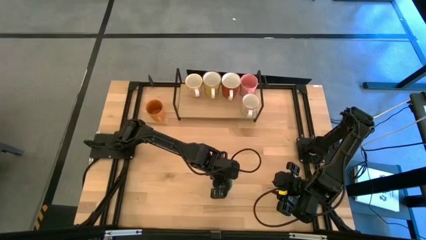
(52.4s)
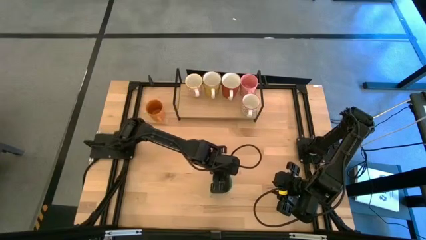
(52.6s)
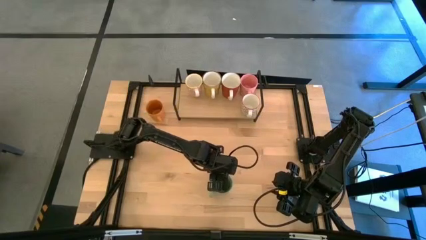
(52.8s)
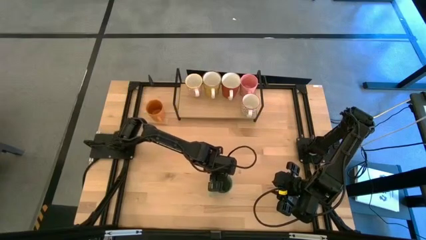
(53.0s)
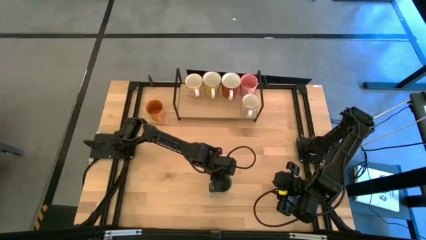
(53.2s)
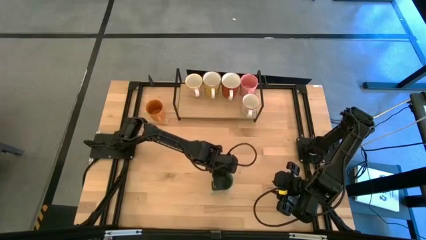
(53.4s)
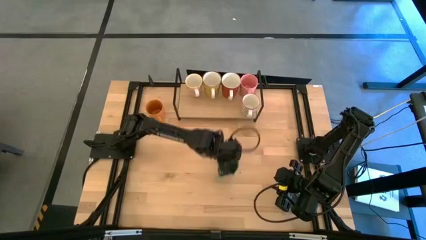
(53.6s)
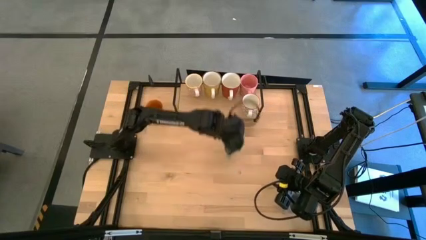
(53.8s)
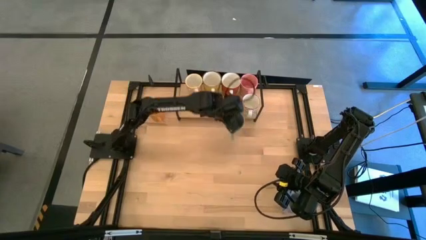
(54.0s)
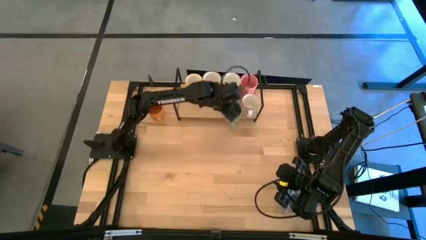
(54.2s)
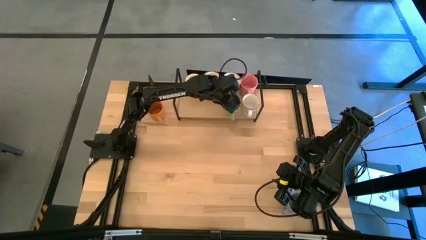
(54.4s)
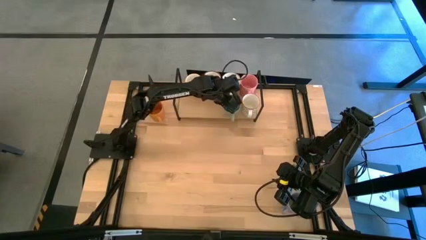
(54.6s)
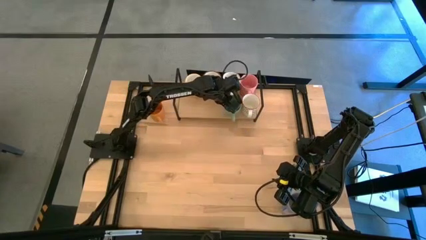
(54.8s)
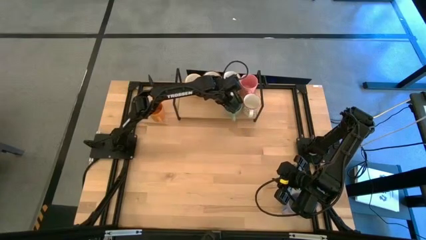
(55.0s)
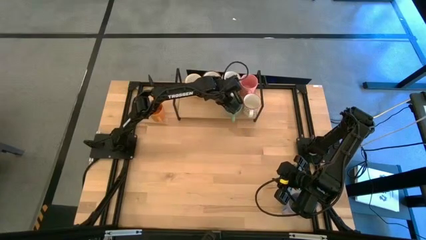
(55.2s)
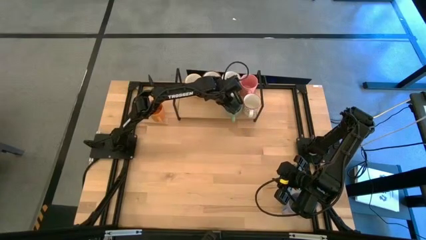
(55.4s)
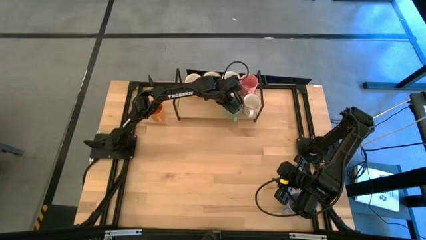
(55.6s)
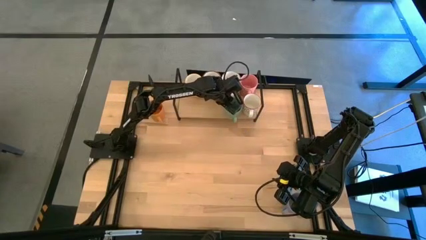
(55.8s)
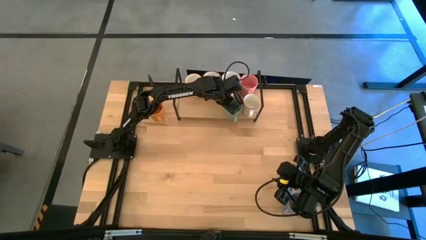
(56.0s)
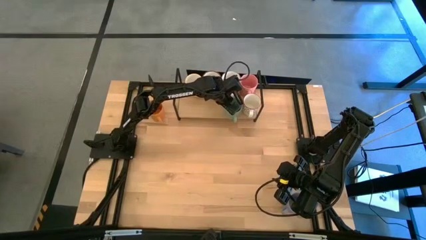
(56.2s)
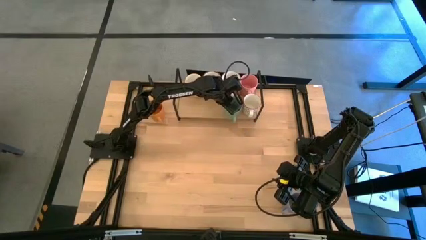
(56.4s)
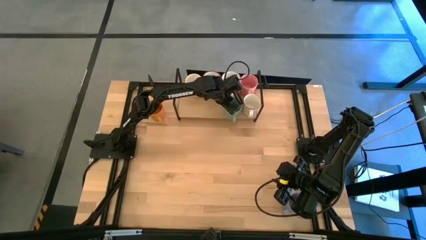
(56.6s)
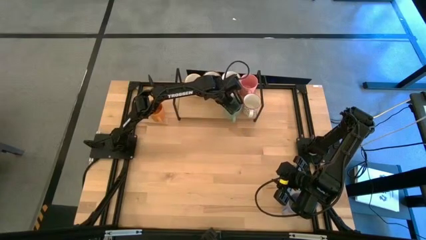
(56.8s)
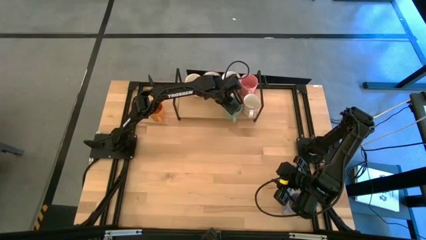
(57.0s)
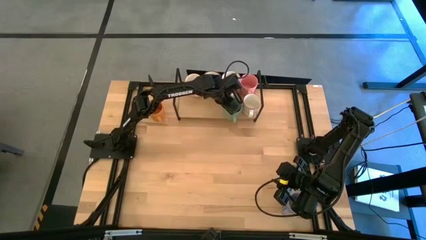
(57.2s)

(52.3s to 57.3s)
Task: Place coffee mugs
Put the green mug on the shelf

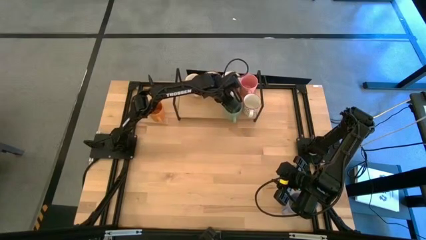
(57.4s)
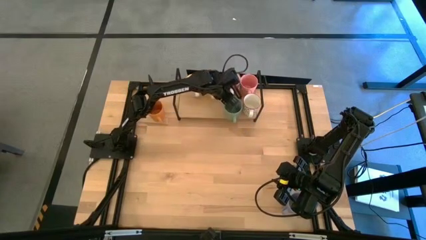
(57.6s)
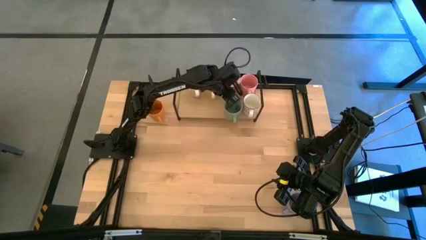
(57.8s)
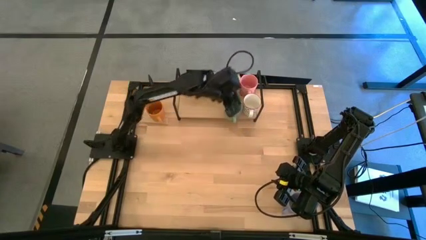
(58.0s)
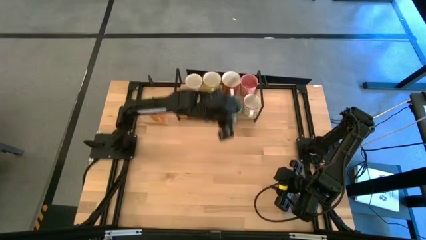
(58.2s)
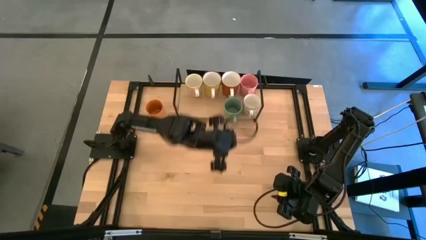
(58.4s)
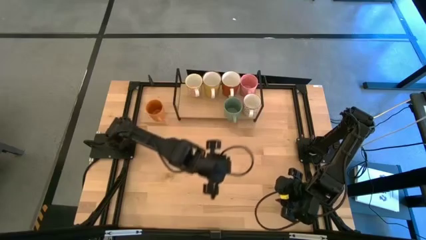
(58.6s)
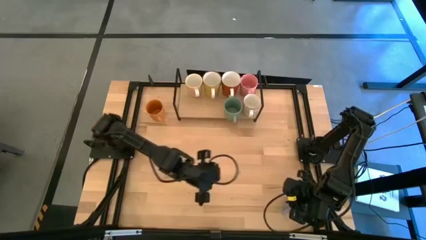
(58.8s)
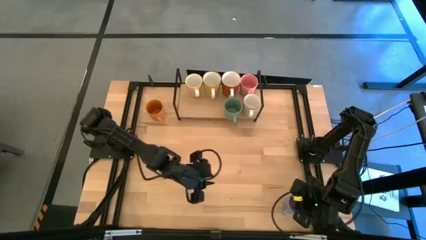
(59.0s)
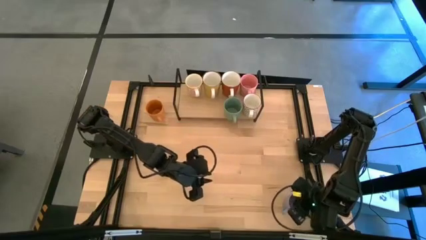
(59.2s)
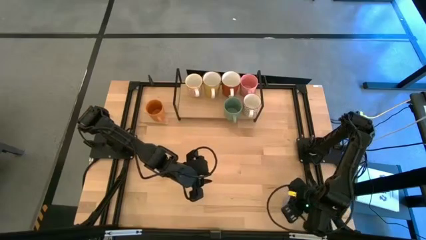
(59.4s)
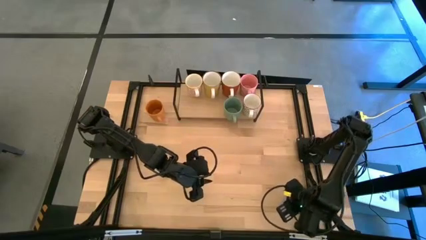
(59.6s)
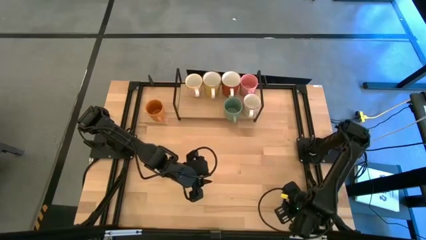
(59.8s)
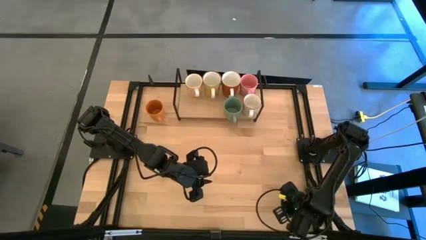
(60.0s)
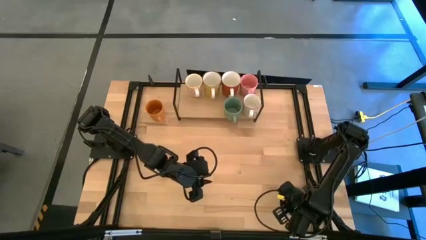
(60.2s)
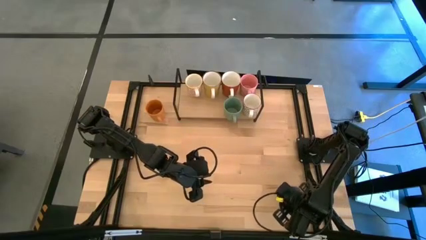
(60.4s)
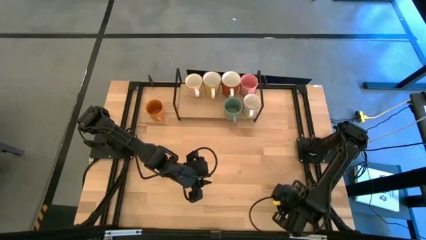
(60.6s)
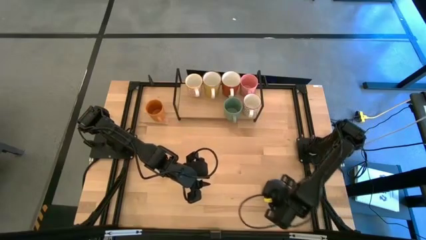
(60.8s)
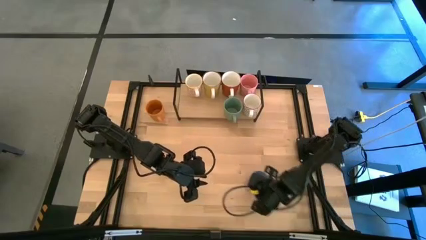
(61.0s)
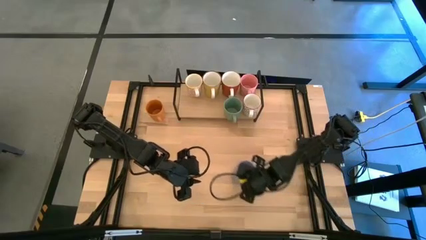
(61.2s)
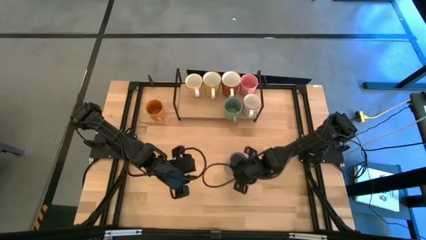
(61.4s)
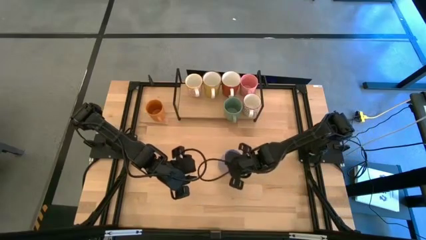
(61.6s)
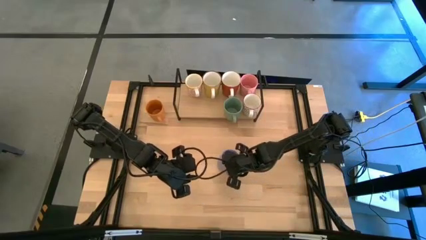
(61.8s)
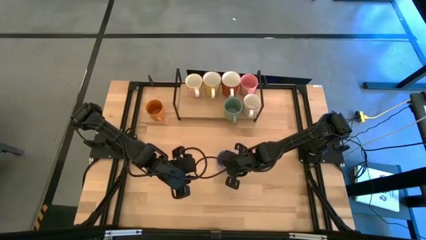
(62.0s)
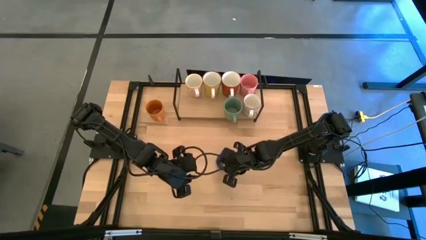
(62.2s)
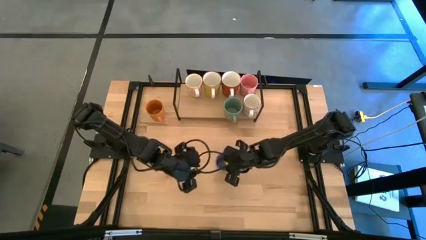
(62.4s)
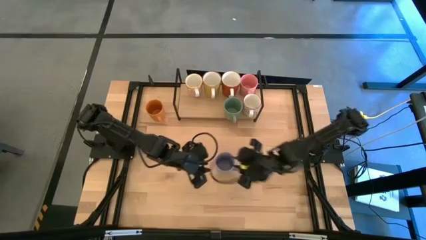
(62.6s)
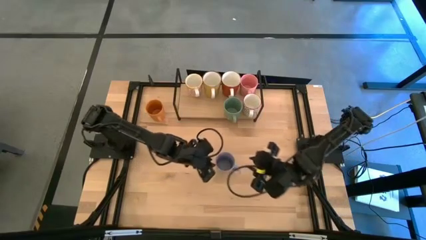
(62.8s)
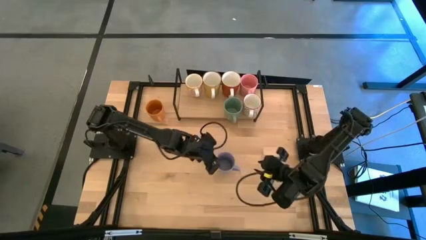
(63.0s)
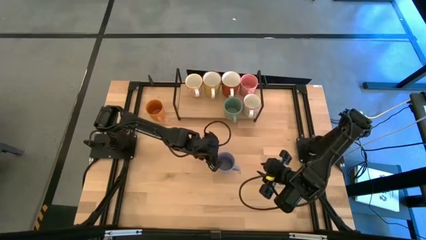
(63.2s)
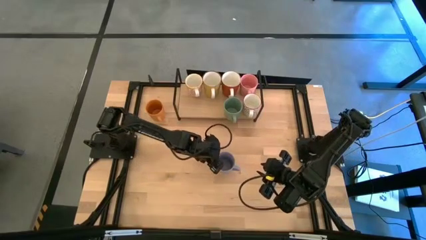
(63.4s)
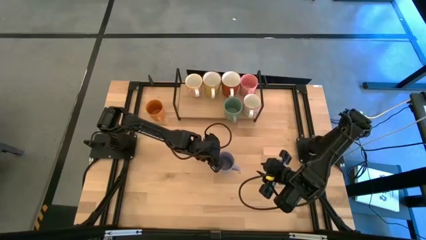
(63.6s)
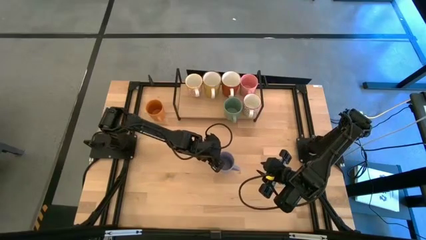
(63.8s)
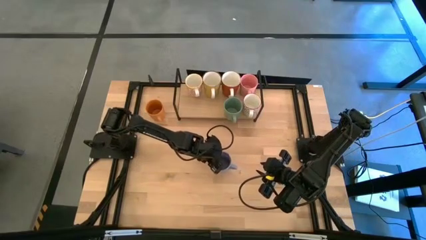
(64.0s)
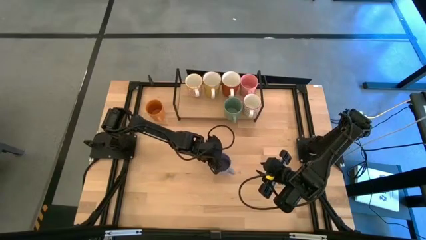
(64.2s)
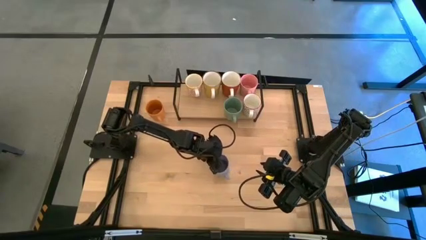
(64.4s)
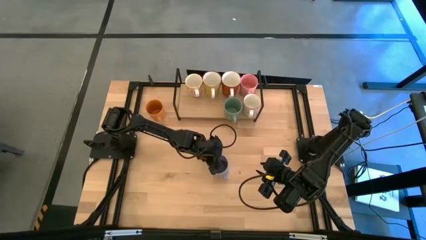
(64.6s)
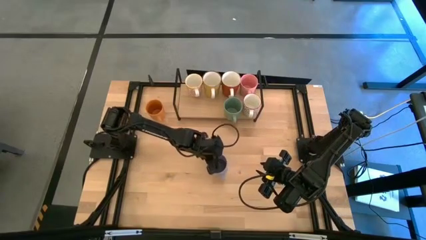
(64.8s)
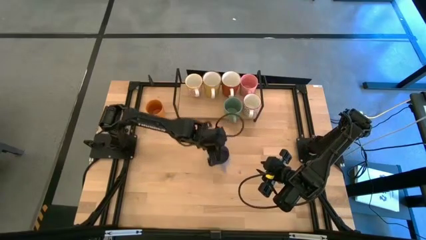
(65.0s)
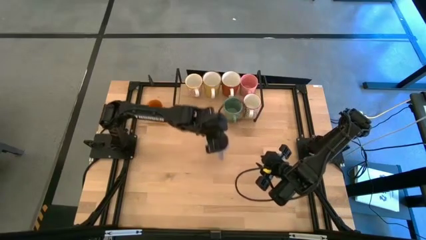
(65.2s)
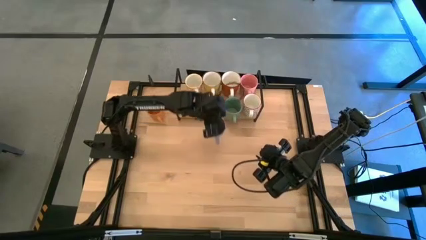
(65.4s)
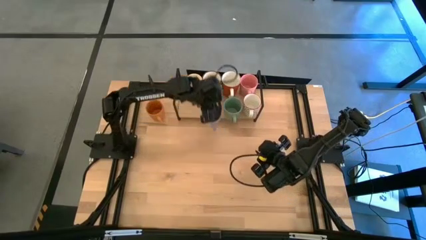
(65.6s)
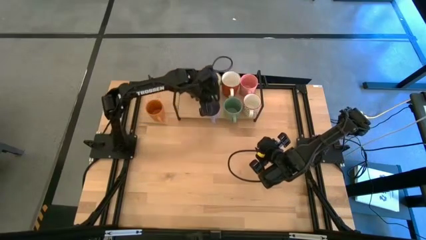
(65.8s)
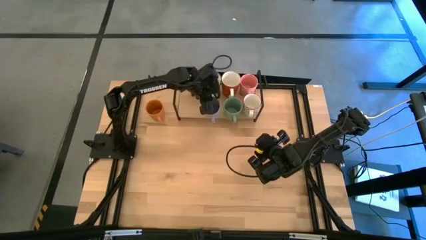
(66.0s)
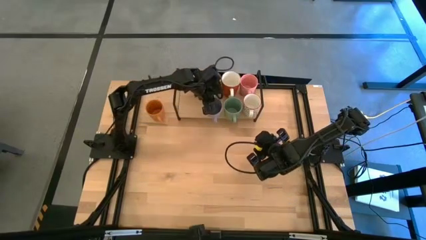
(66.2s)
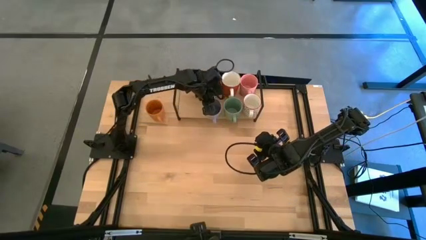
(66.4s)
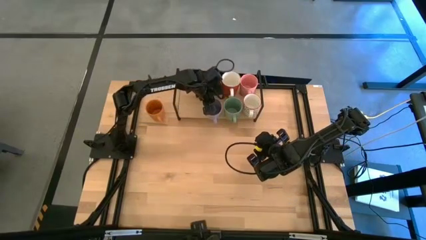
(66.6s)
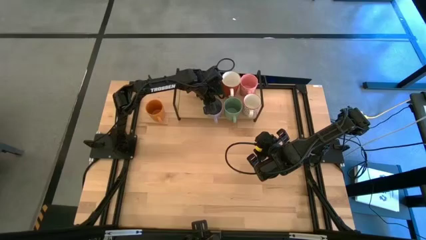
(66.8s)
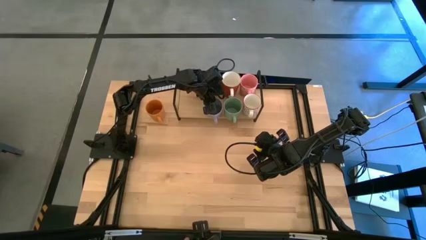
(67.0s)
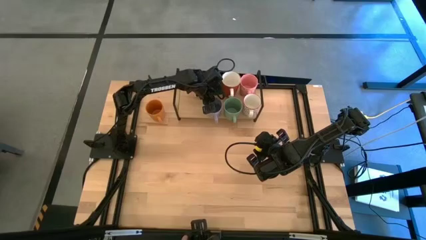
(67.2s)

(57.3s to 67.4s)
Put the blue mug on the shelf
